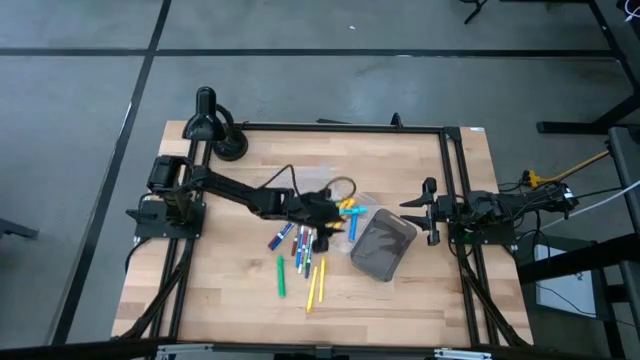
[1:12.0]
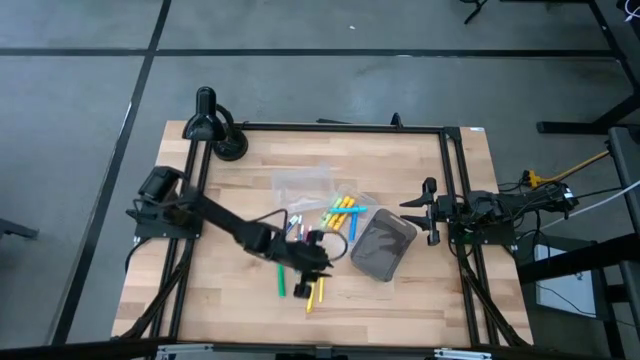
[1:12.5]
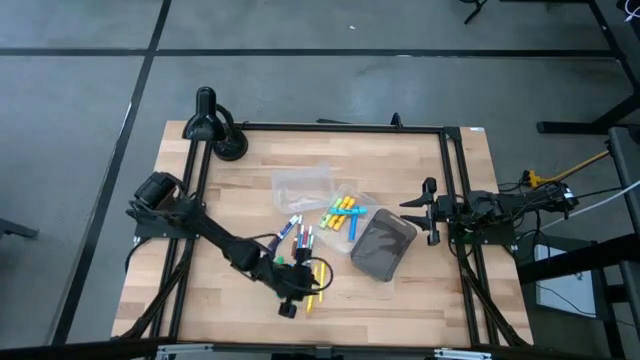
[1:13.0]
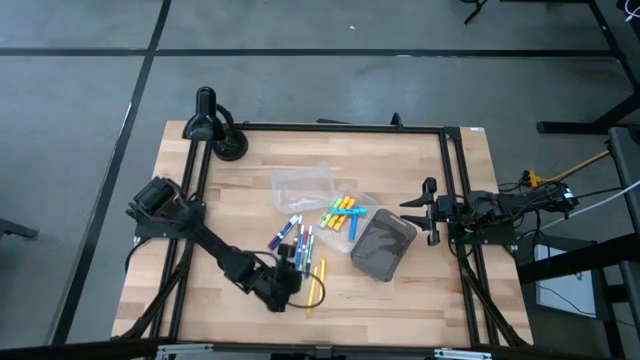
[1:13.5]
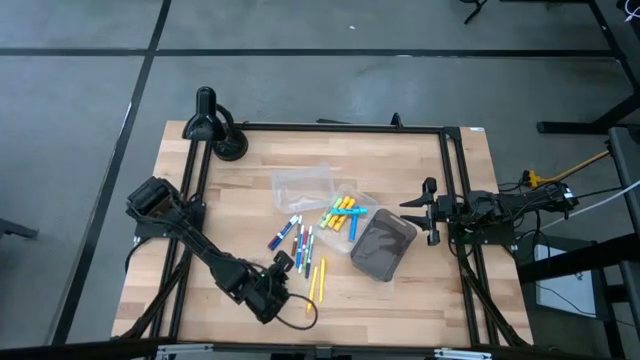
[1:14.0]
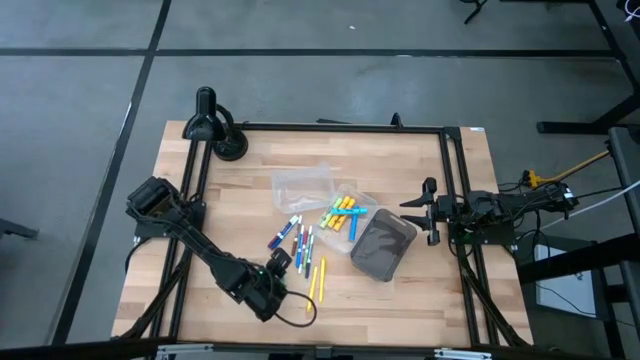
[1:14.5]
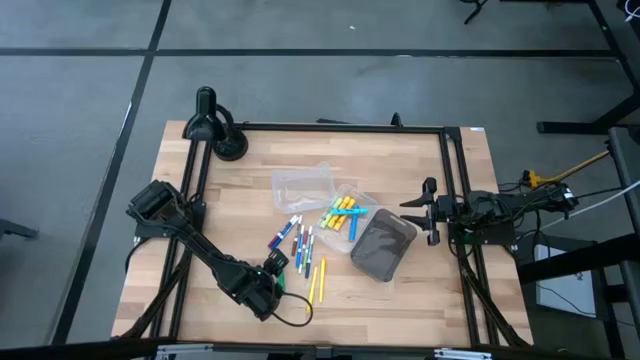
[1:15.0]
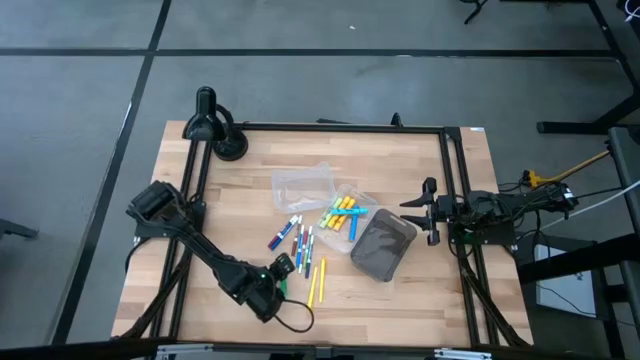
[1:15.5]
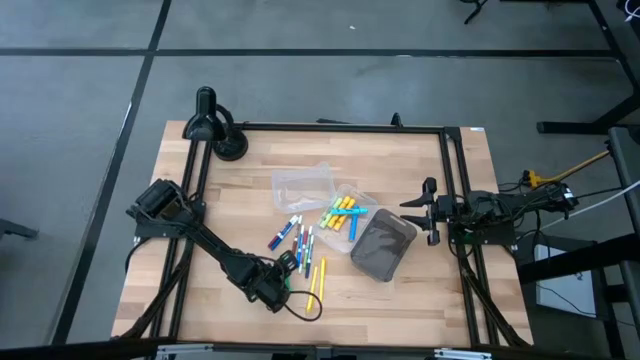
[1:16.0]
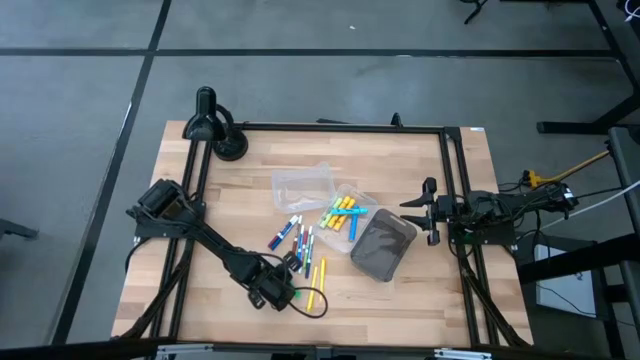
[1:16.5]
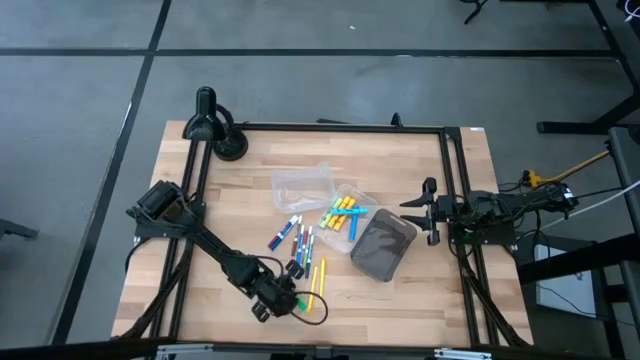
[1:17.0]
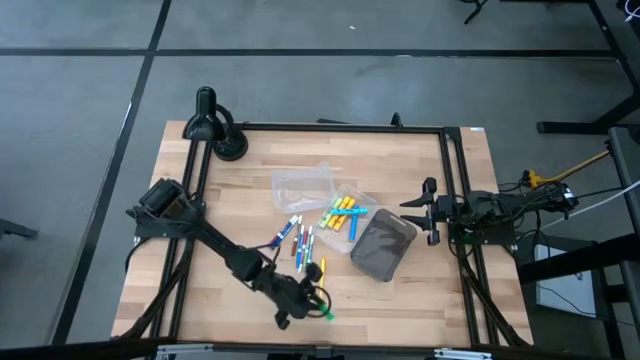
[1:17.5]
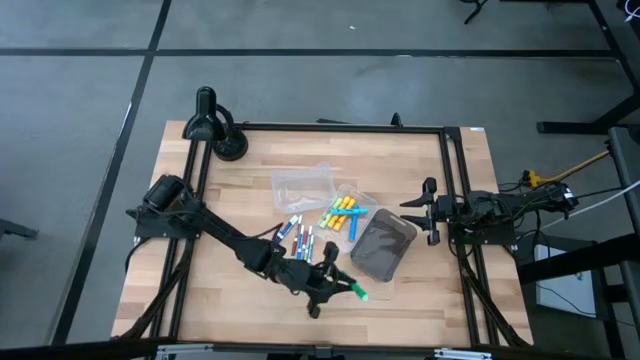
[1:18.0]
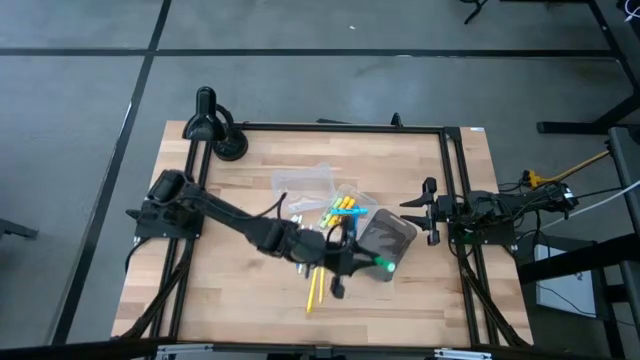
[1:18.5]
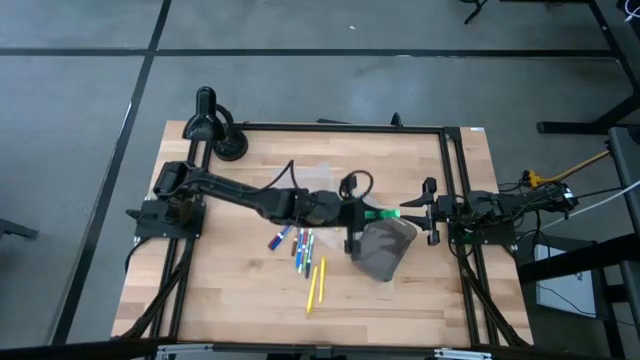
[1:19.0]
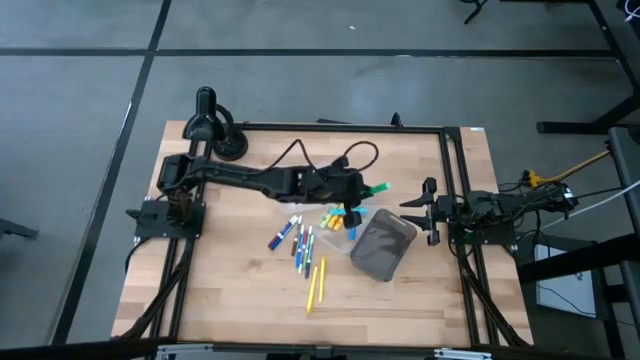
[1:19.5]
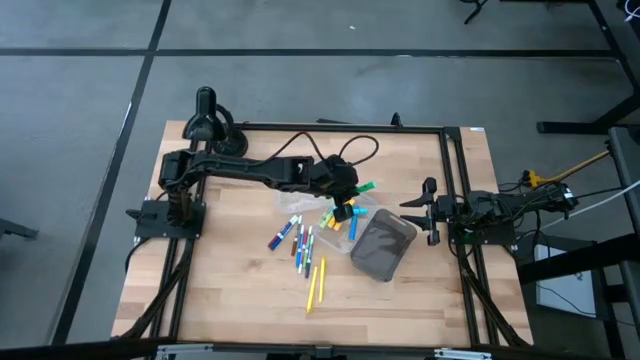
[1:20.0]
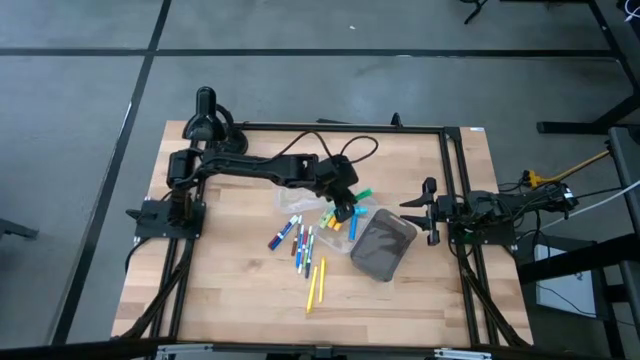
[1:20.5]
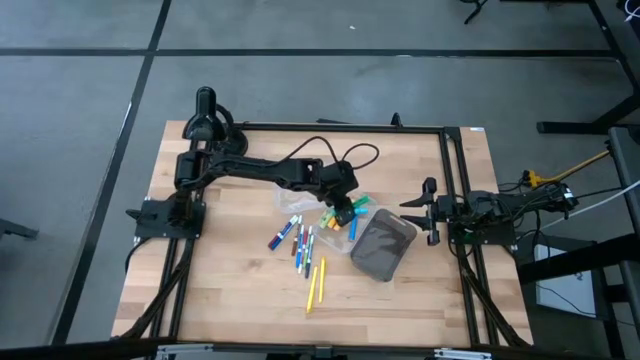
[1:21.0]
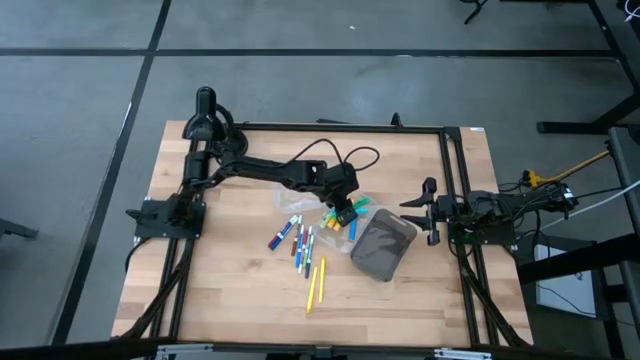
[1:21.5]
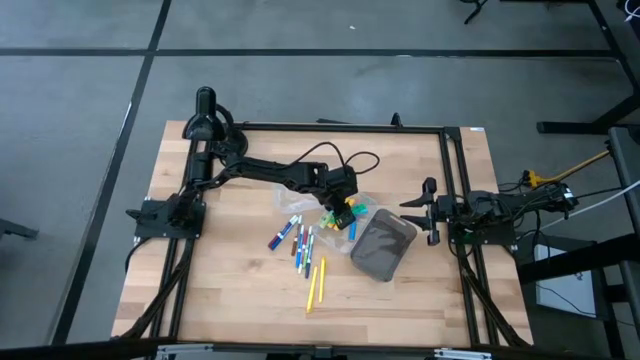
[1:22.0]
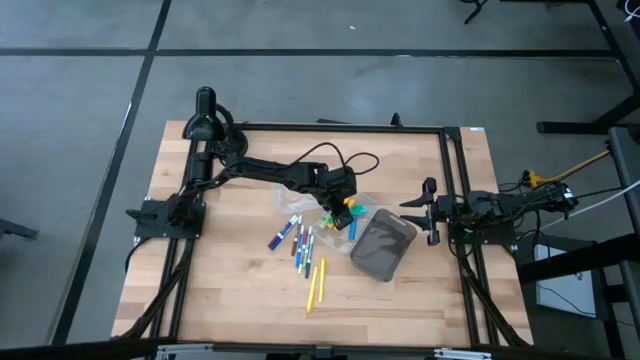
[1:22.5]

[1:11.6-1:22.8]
Task: Pick & Place Markers
Put the green highlighter pen into the right transparent bin

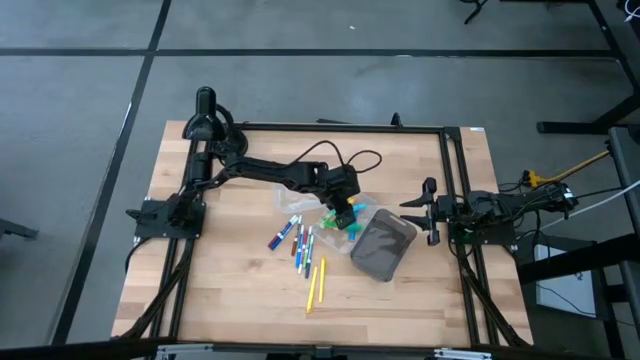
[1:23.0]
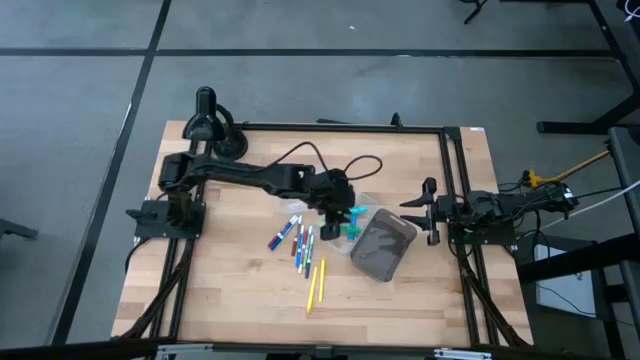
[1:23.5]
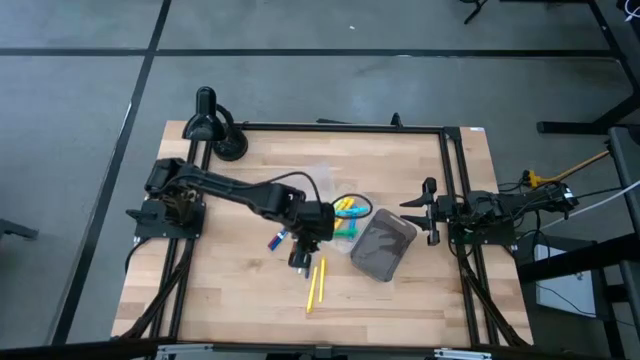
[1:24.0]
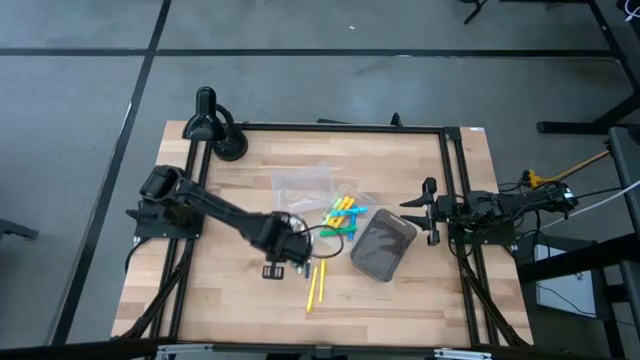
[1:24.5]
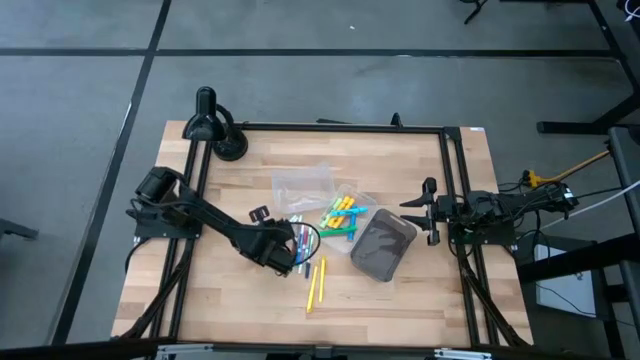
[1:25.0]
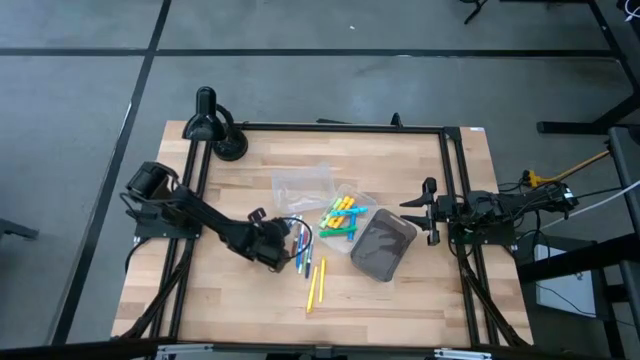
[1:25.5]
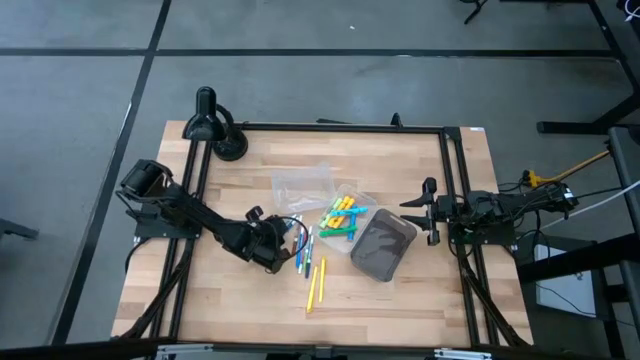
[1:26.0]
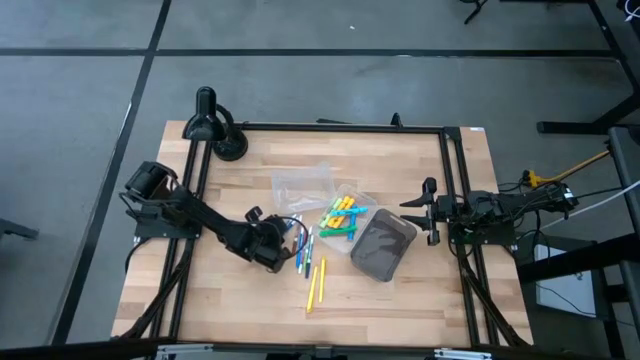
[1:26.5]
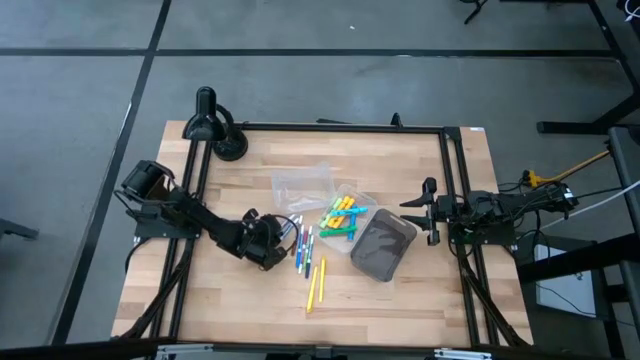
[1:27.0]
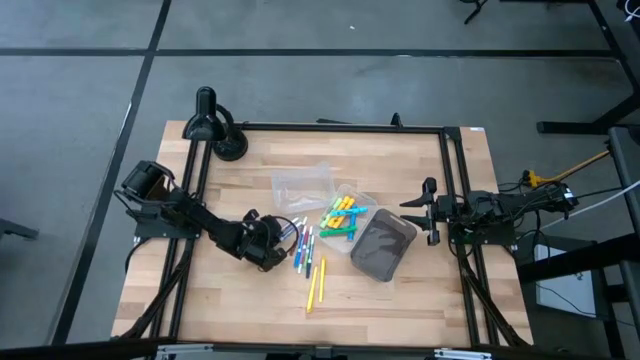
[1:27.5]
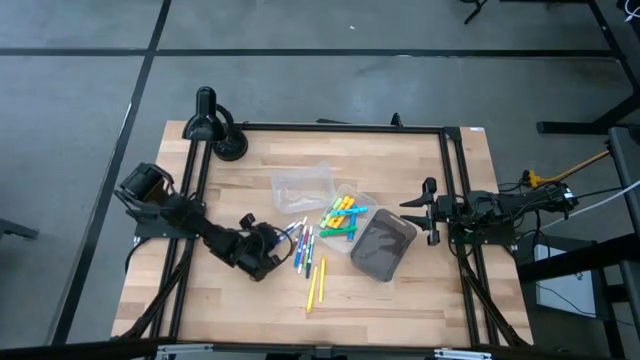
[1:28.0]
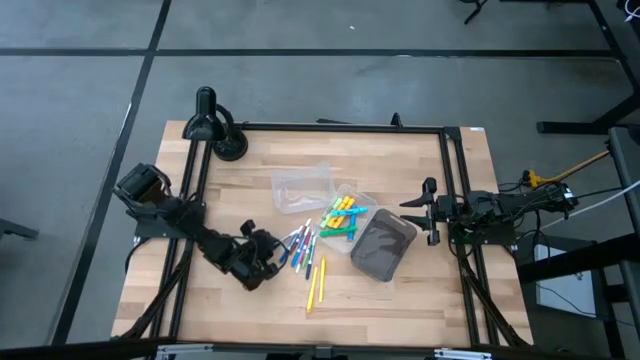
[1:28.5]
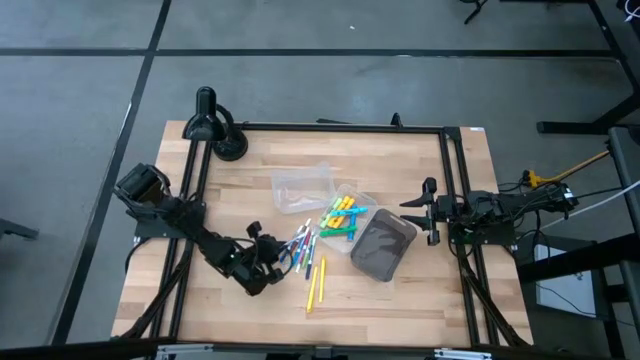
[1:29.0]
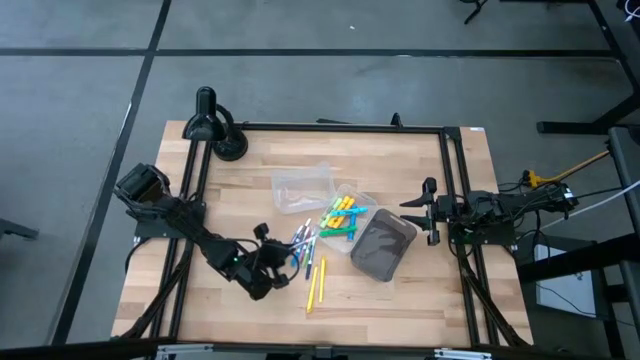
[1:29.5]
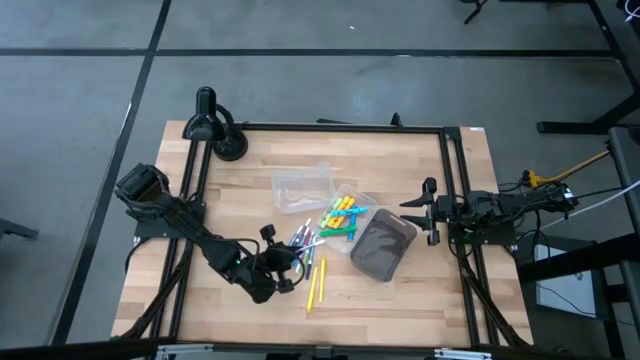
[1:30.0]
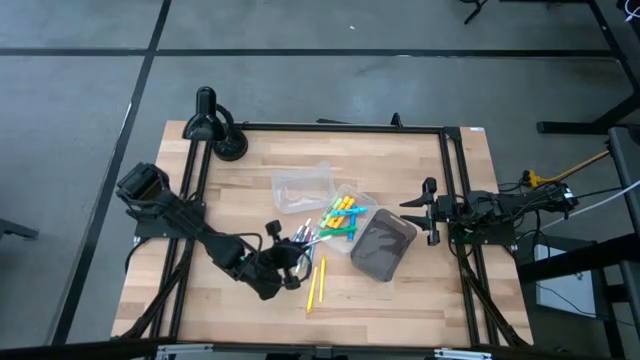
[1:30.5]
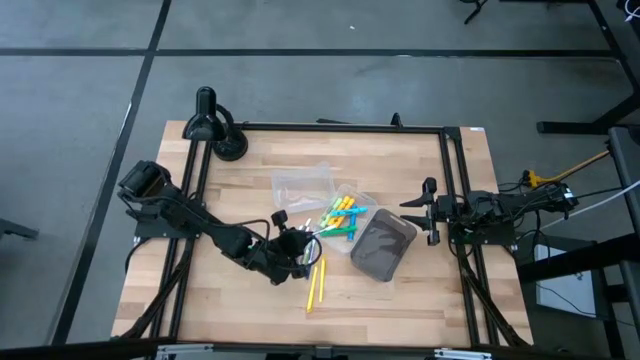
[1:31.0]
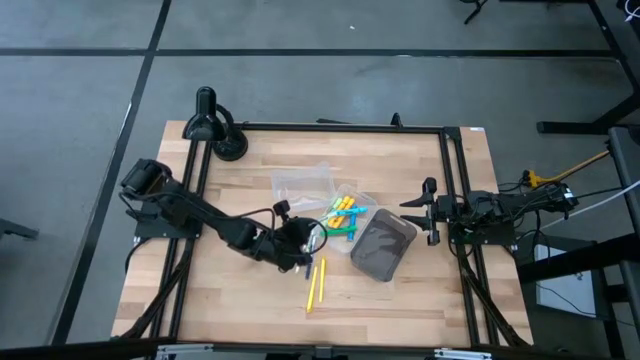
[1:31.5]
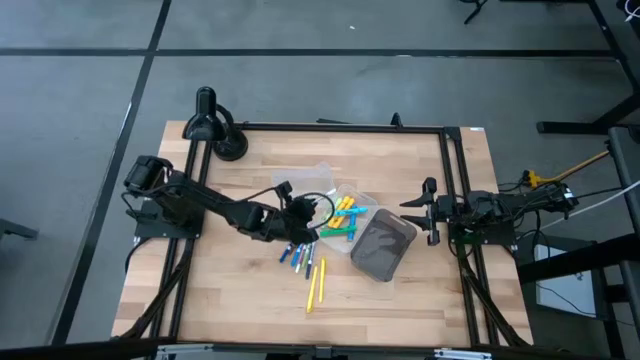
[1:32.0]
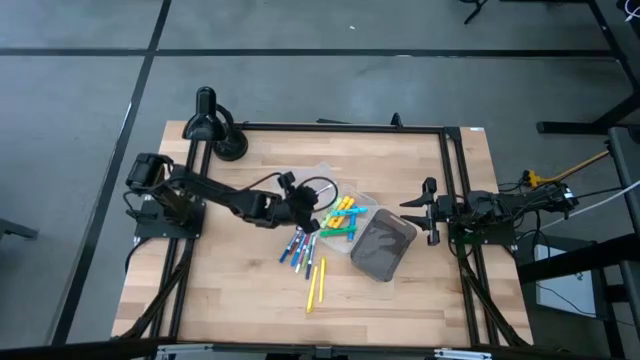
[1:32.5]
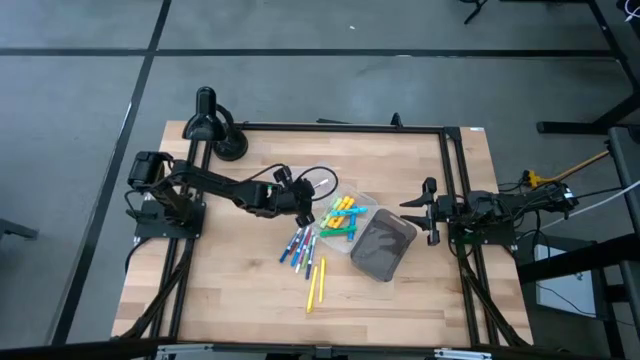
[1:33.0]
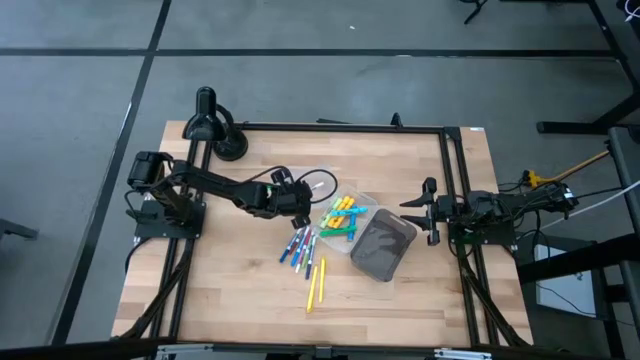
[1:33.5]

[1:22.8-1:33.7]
Put the right red marker pen into the left transparent bin
